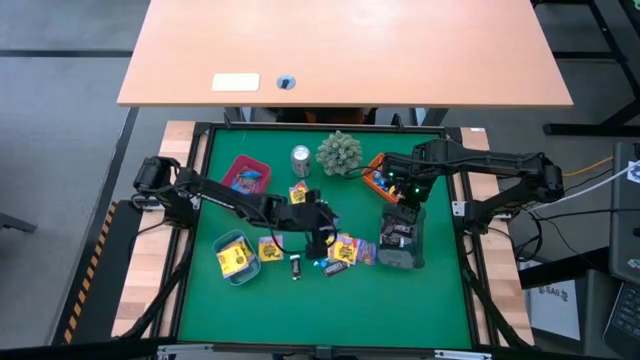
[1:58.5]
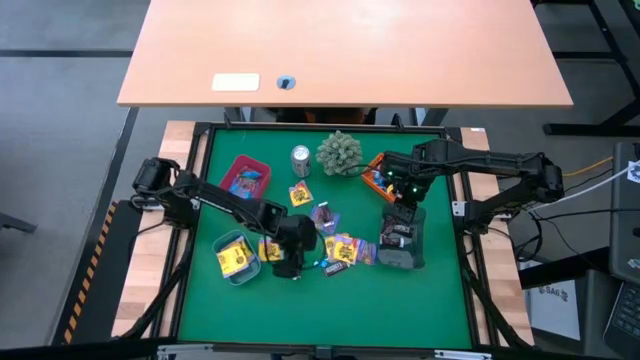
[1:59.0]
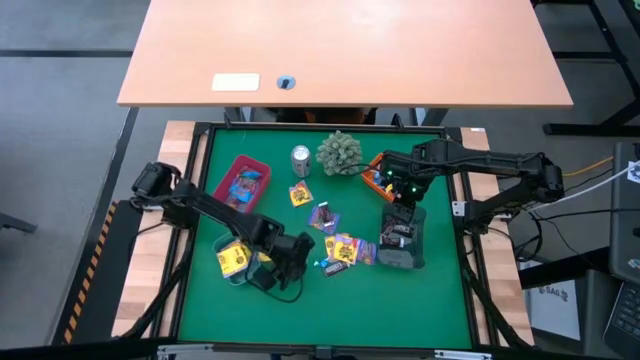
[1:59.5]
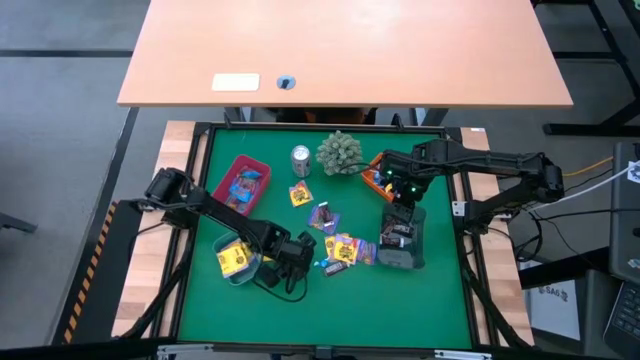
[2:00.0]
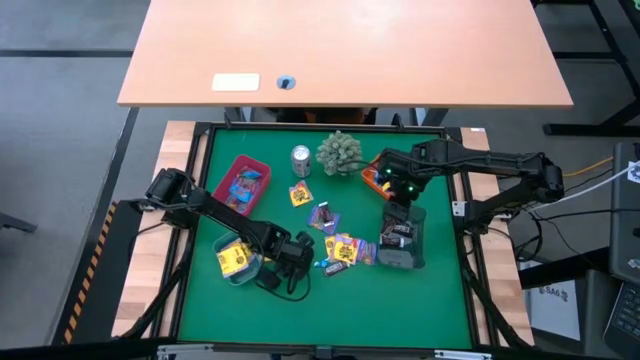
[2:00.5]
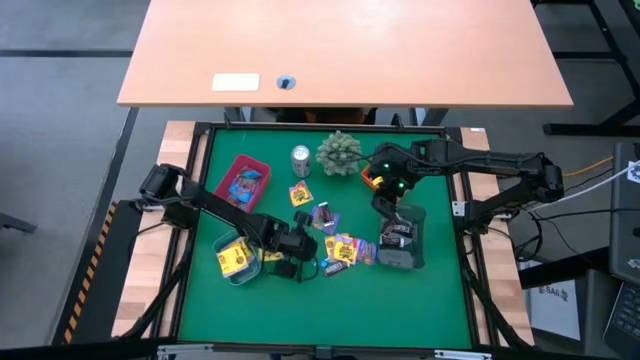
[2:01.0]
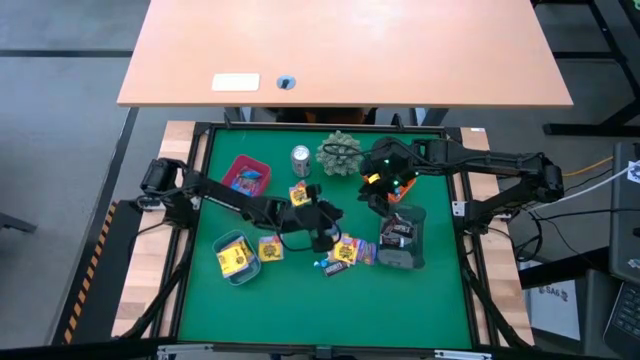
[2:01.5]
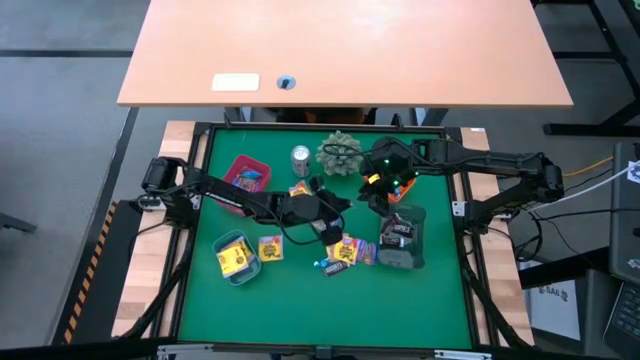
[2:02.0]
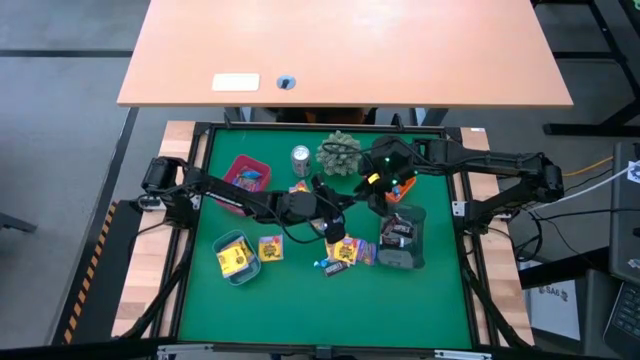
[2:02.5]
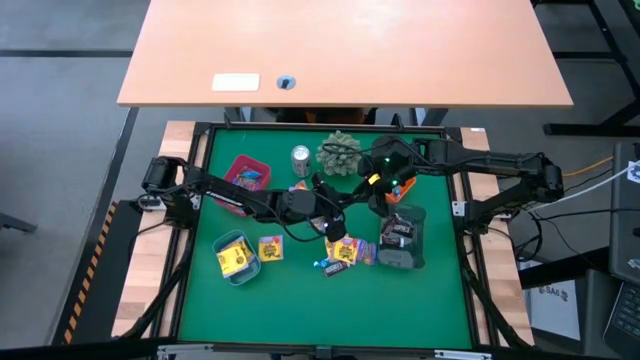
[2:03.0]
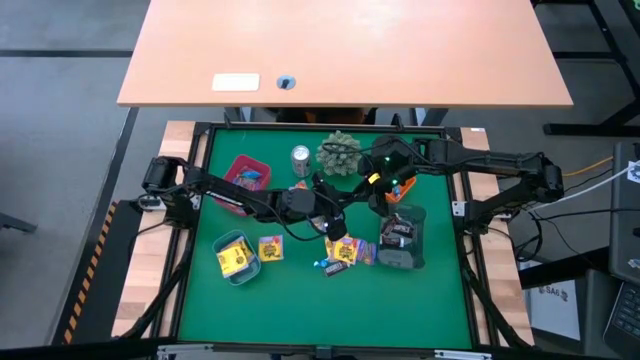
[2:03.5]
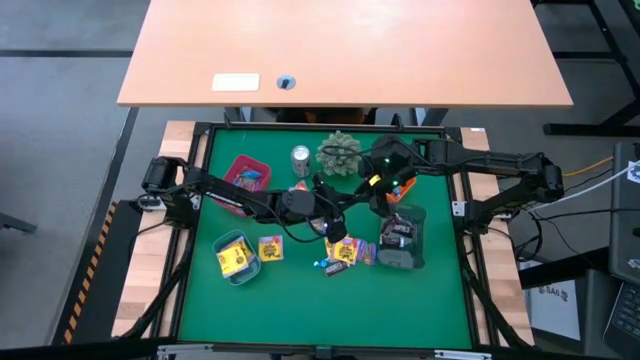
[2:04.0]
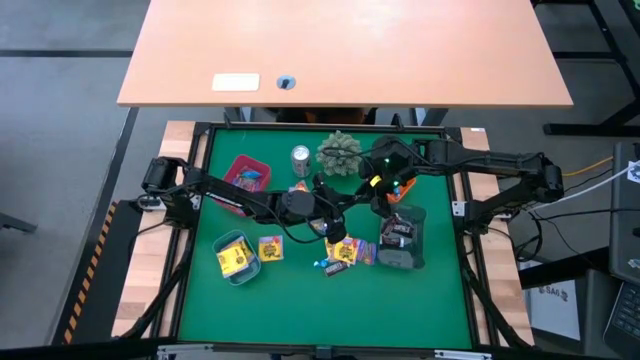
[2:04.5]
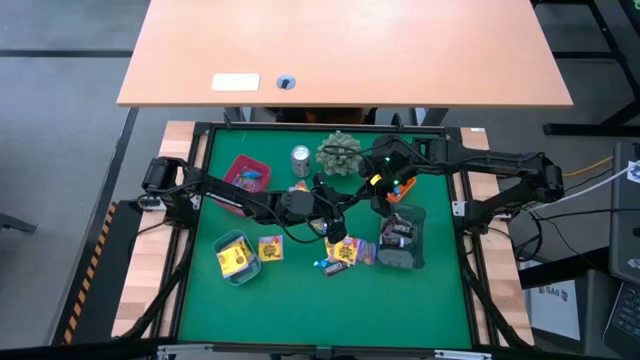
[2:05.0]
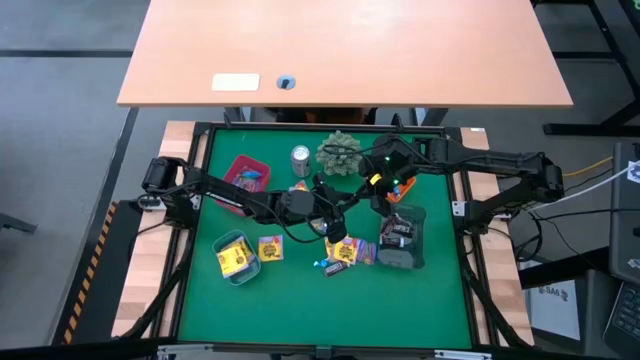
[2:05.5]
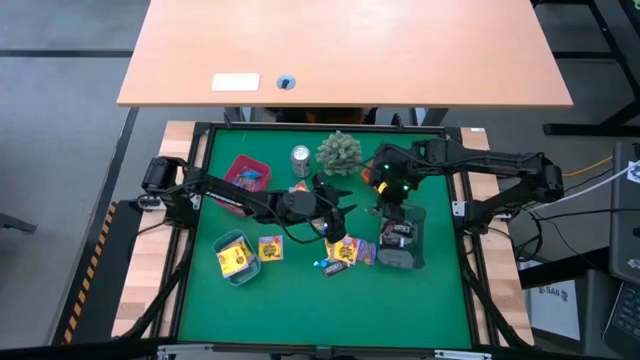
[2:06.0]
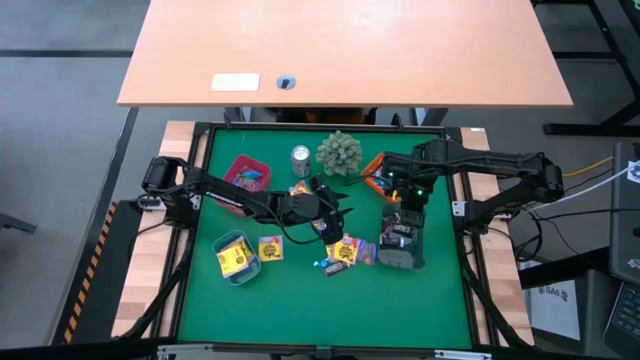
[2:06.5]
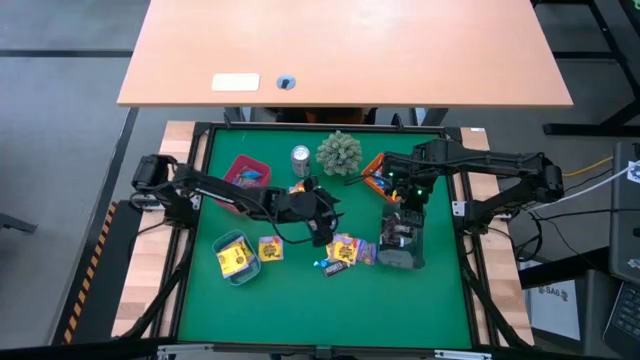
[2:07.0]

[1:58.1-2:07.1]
Task: Sort candy
Put the brown chocolate candy into the black bin

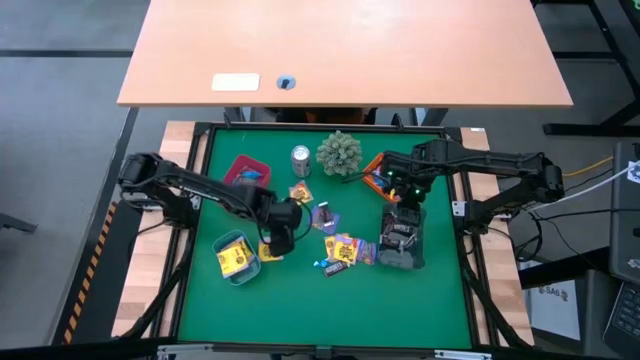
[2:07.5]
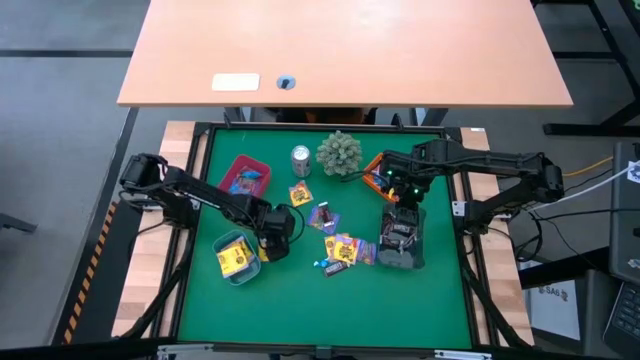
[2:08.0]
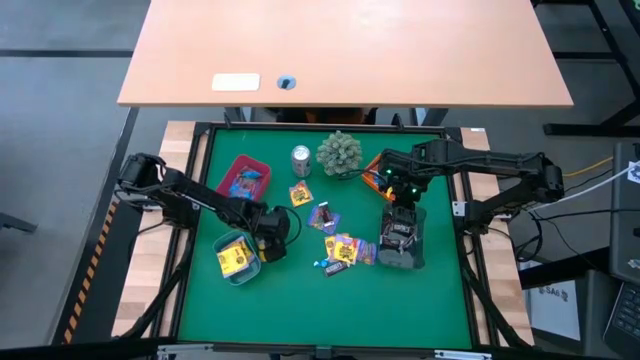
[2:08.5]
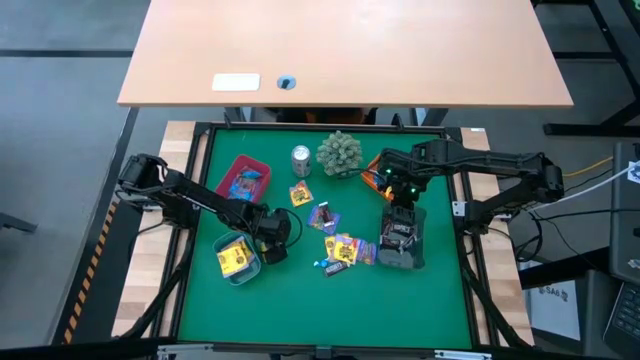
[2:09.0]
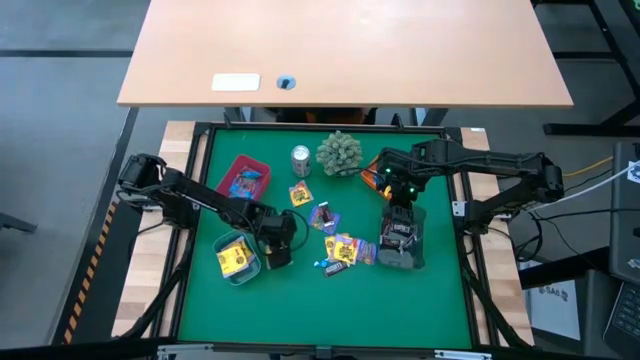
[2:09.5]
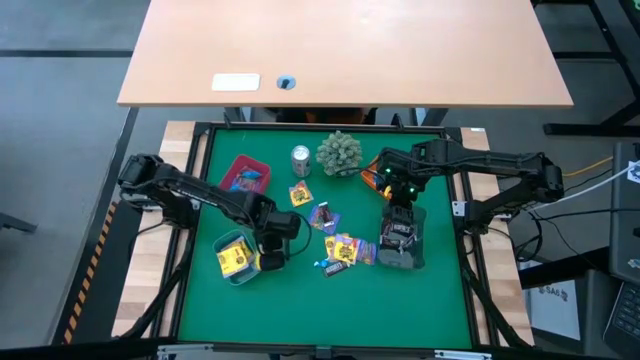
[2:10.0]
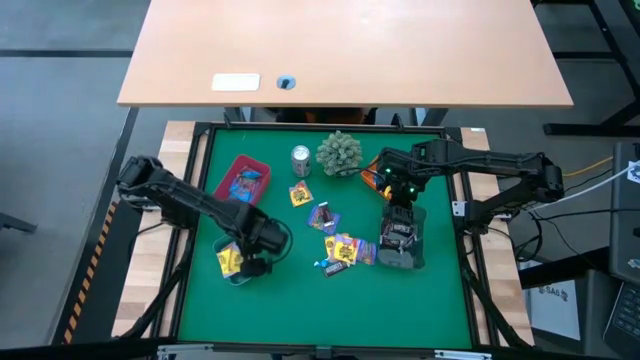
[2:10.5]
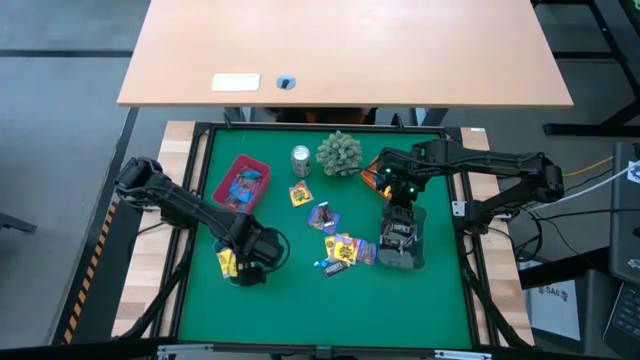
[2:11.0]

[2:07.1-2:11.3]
Put the yellow candy into the blue transparent bin

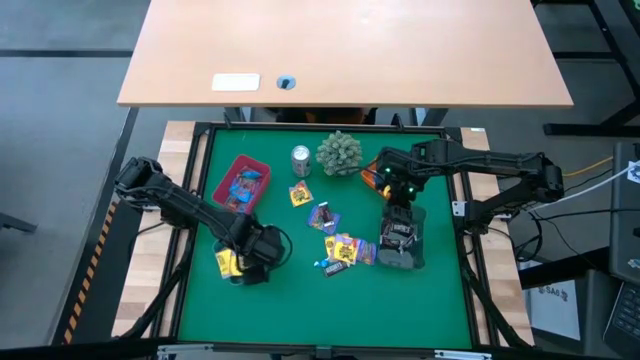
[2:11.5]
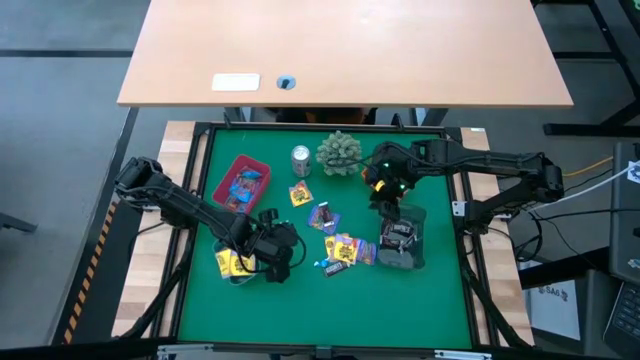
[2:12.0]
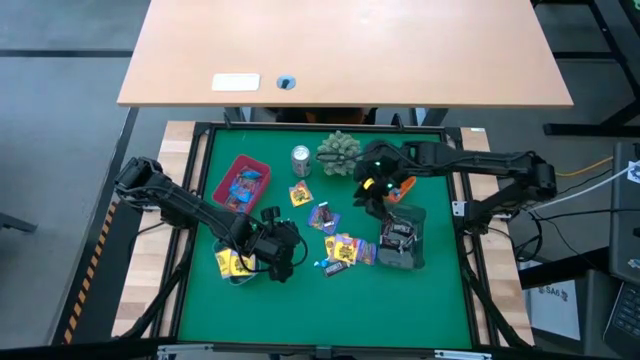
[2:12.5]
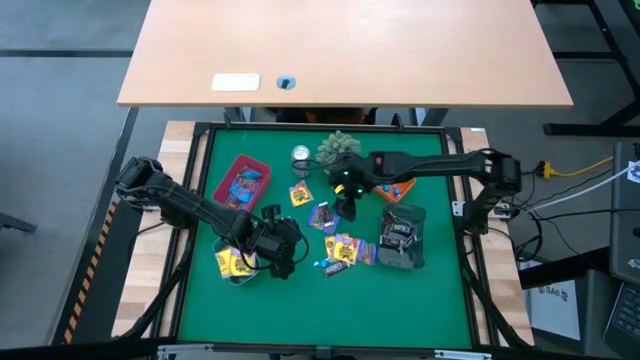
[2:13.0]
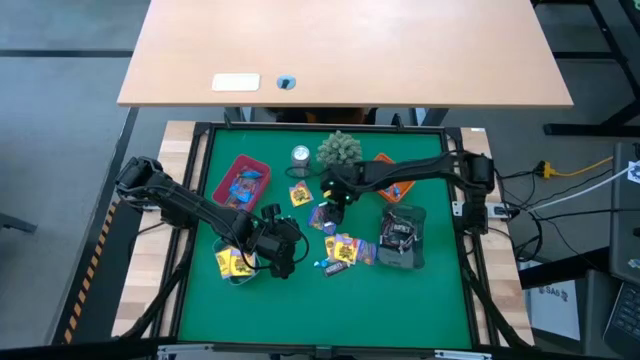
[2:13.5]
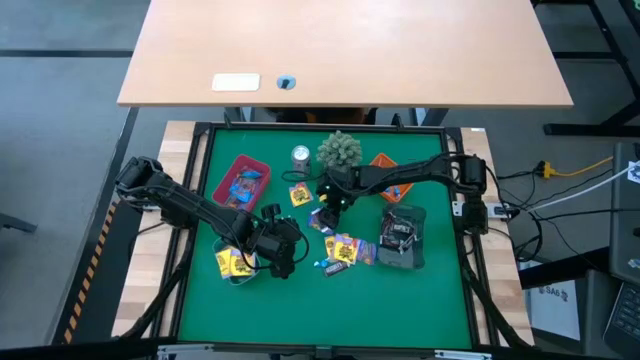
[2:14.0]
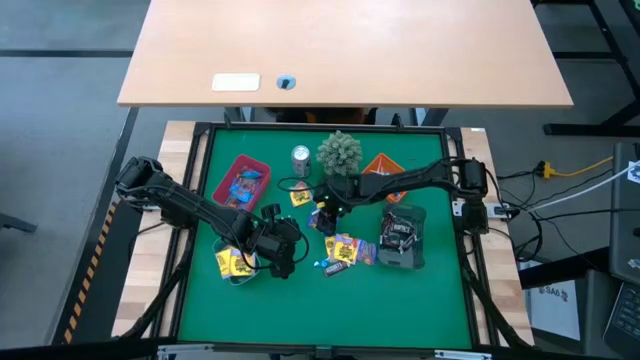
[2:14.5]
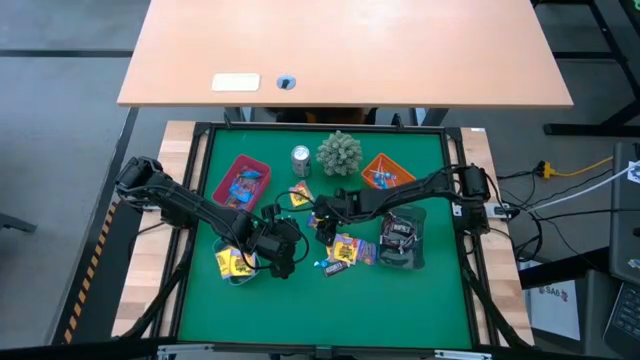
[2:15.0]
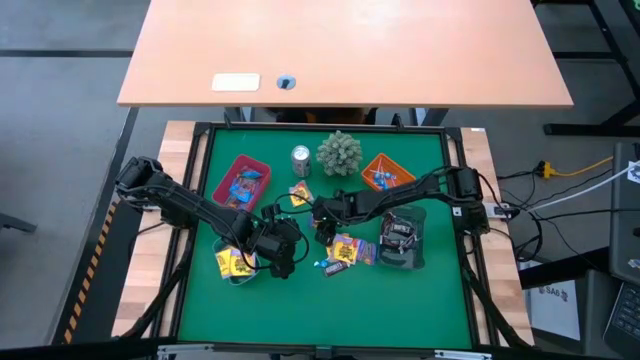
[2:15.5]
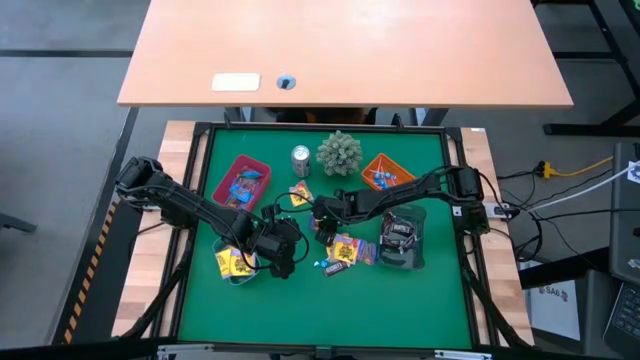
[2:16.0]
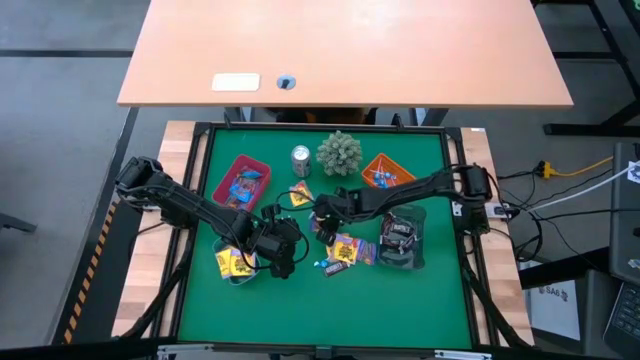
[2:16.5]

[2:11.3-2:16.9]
Put the brown chocolate candy into the black bin

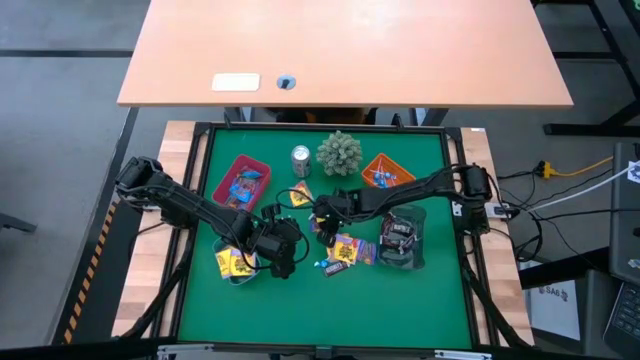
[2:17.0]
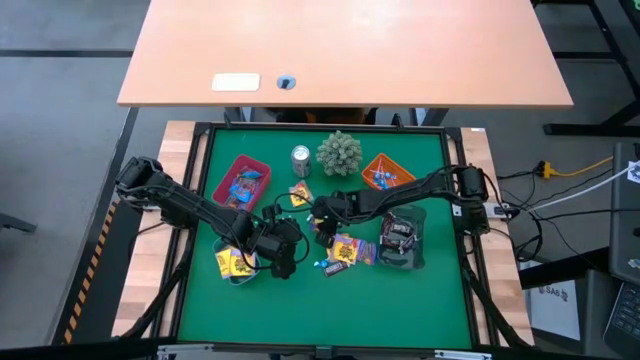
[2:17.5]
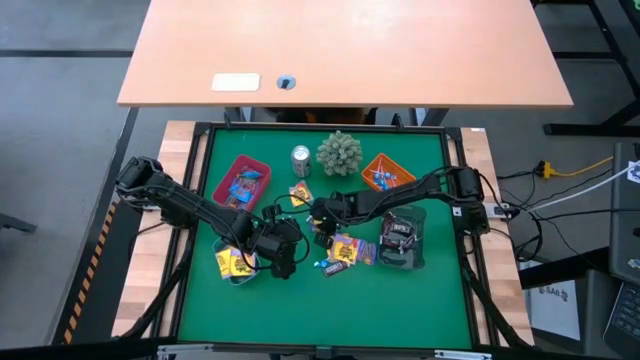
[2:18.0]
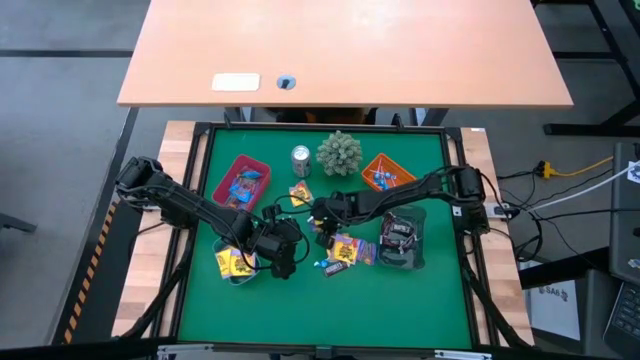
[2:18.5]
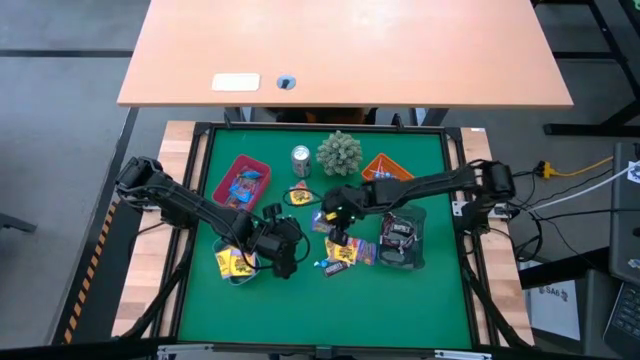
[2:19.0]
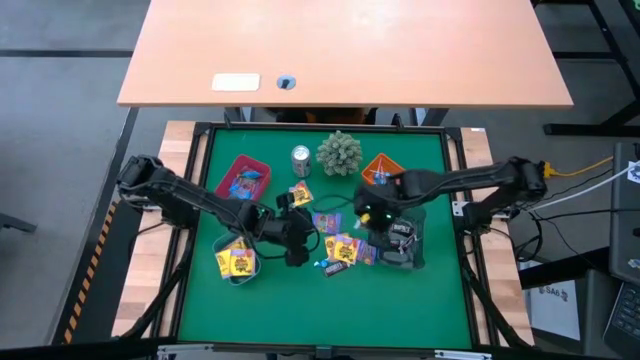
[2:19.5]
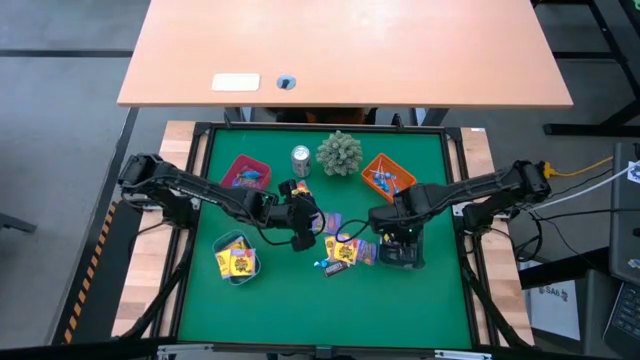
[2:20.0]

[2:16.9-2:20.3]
Put the brown chocolate candy into the black bin
